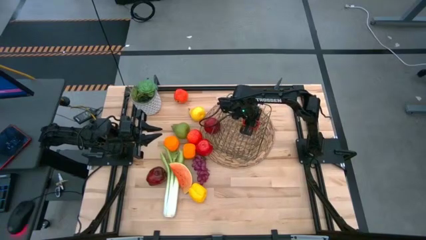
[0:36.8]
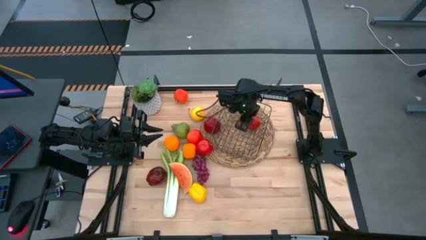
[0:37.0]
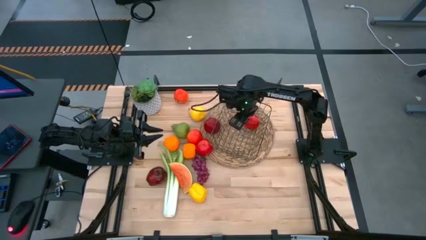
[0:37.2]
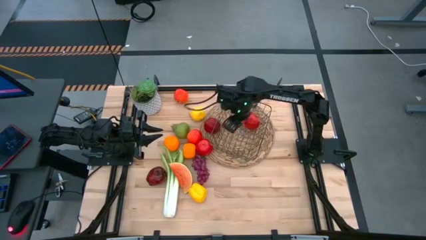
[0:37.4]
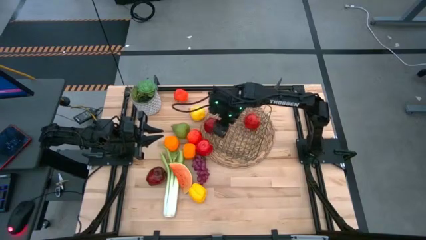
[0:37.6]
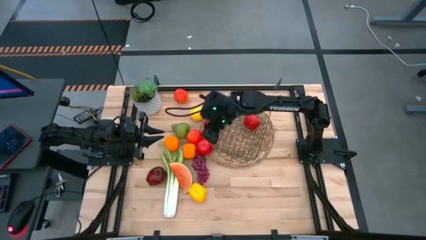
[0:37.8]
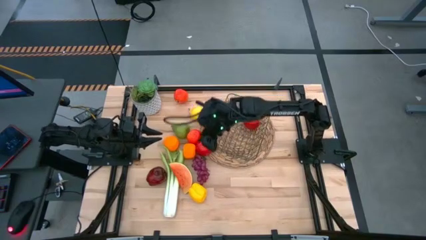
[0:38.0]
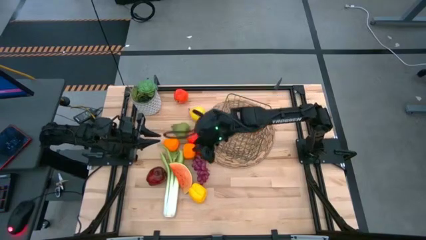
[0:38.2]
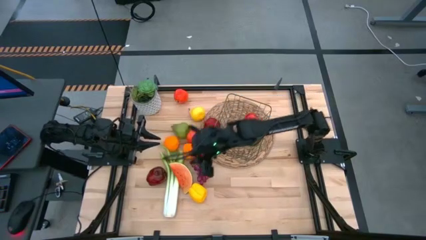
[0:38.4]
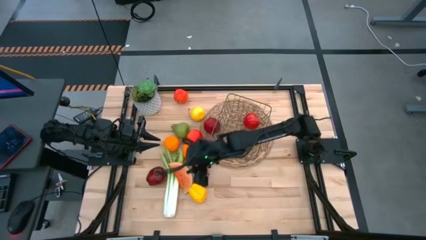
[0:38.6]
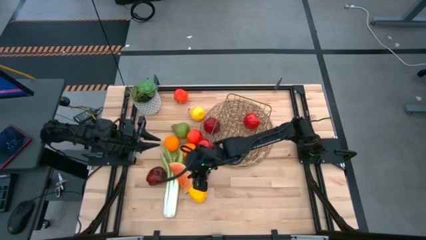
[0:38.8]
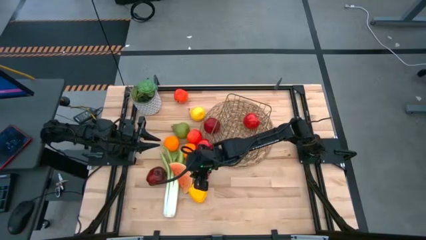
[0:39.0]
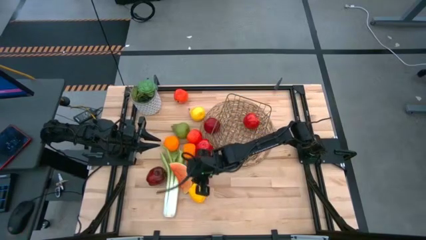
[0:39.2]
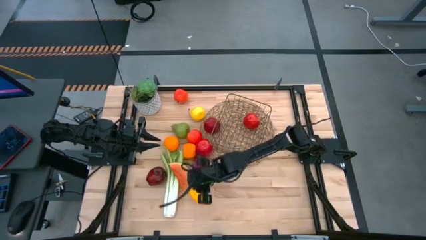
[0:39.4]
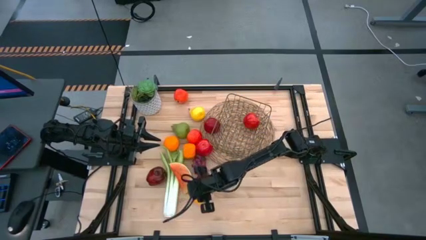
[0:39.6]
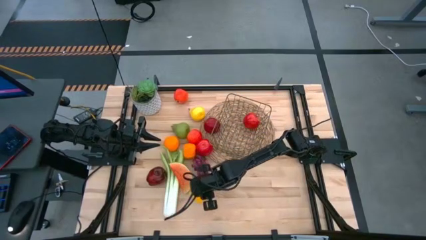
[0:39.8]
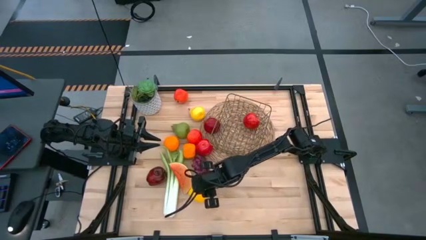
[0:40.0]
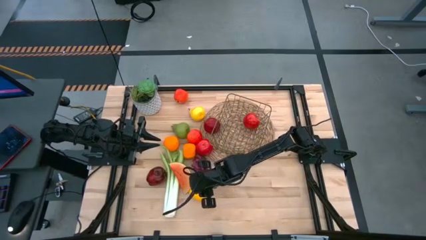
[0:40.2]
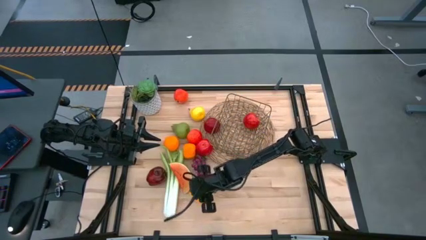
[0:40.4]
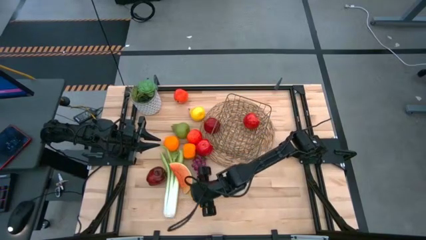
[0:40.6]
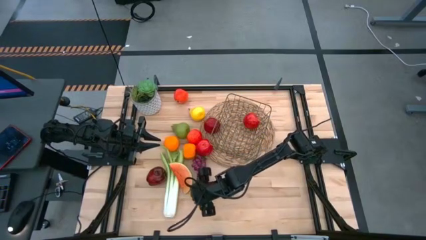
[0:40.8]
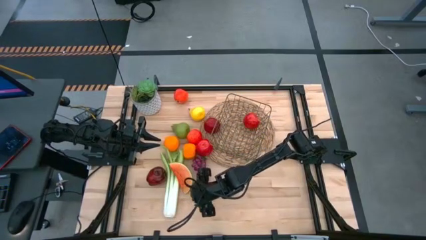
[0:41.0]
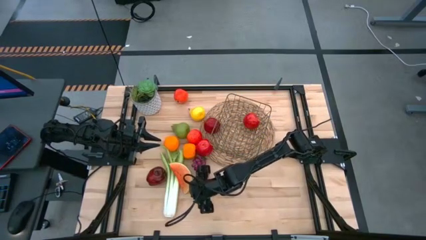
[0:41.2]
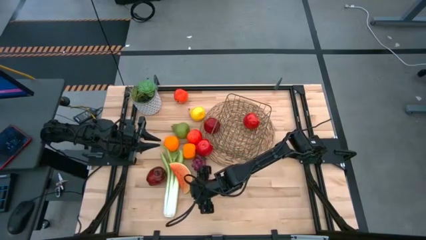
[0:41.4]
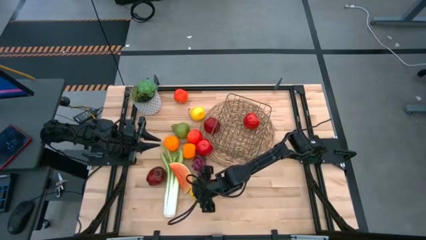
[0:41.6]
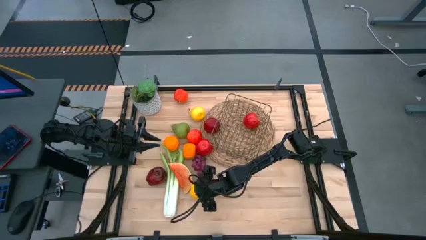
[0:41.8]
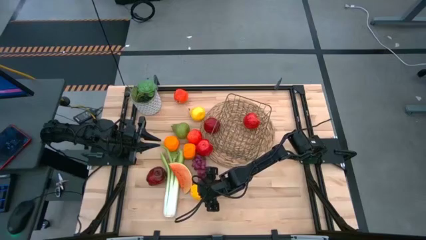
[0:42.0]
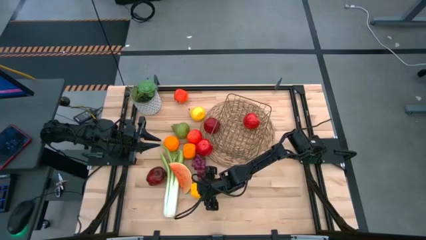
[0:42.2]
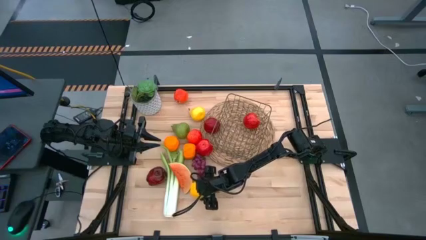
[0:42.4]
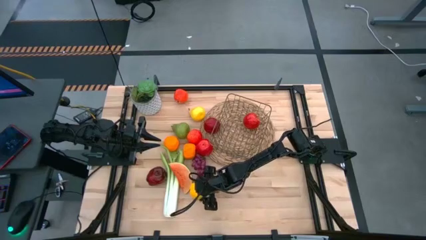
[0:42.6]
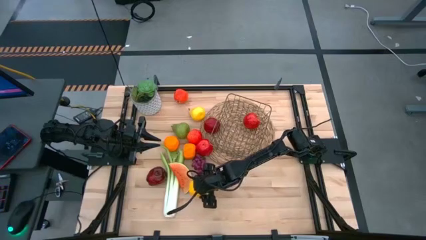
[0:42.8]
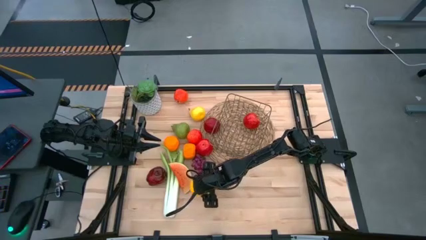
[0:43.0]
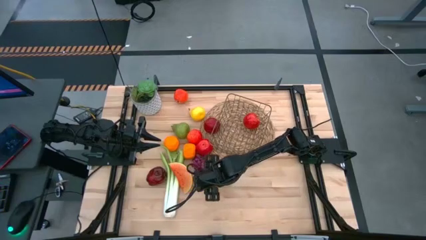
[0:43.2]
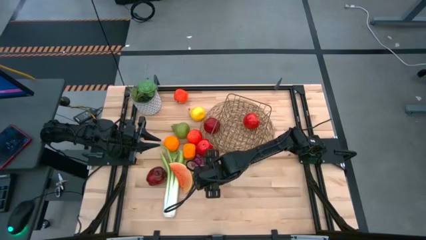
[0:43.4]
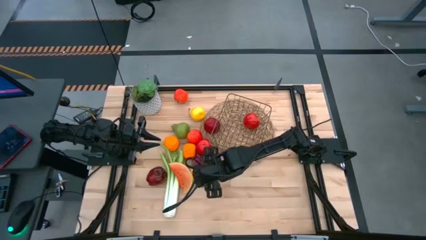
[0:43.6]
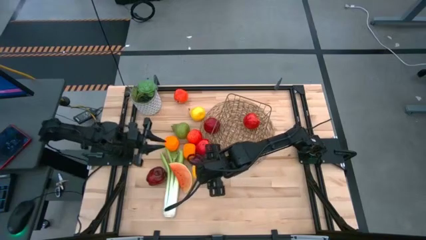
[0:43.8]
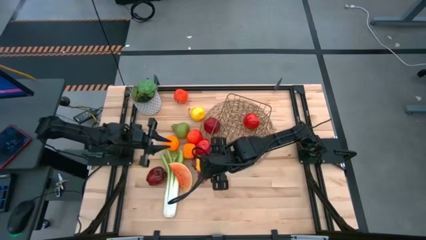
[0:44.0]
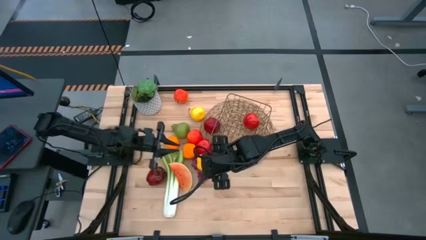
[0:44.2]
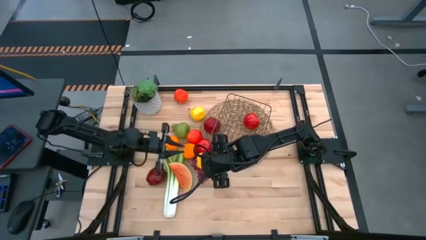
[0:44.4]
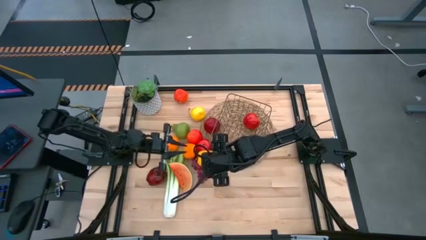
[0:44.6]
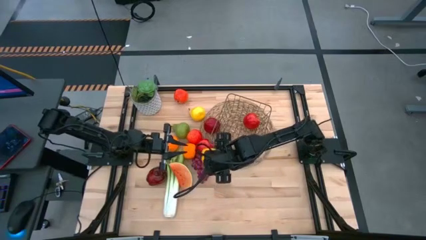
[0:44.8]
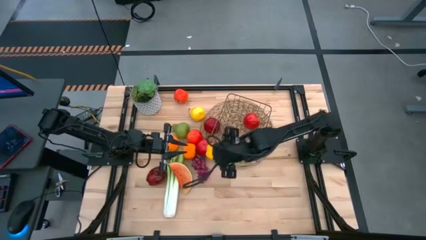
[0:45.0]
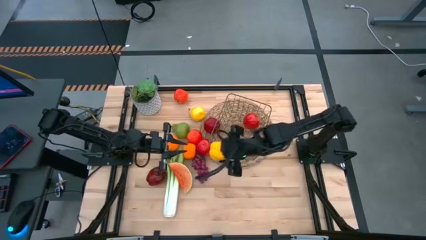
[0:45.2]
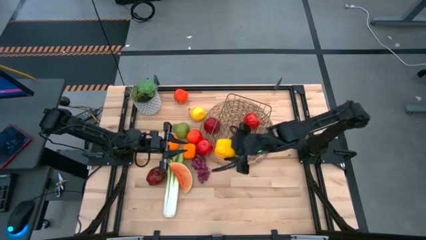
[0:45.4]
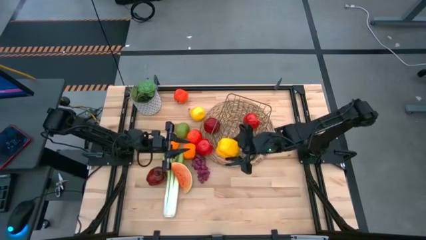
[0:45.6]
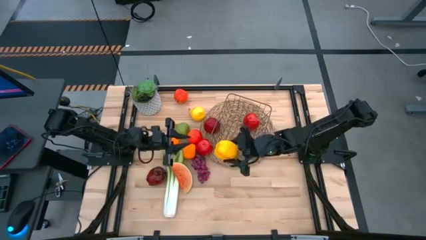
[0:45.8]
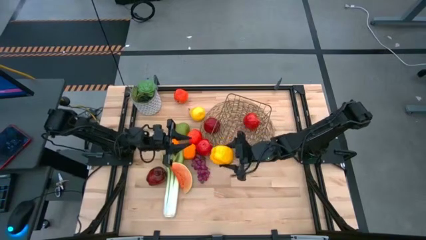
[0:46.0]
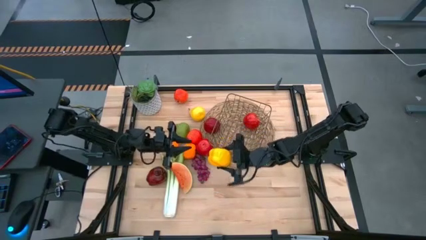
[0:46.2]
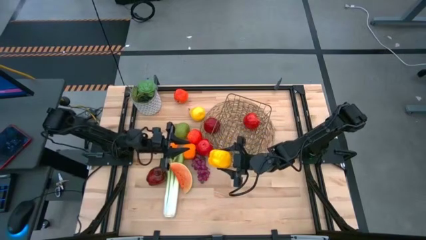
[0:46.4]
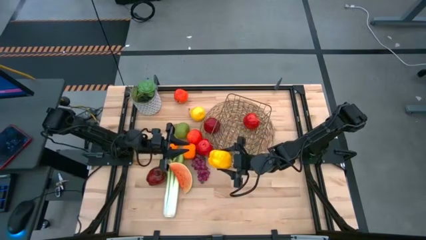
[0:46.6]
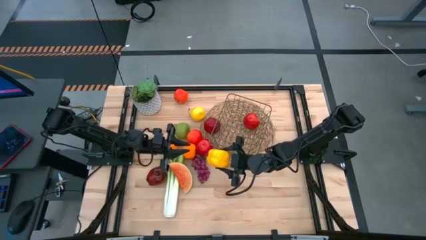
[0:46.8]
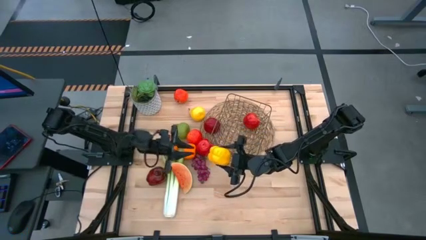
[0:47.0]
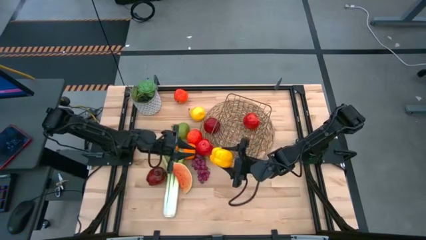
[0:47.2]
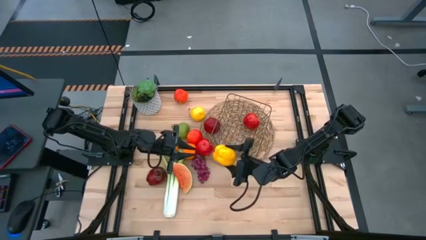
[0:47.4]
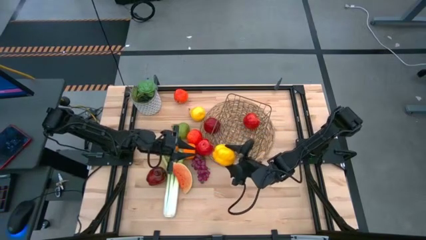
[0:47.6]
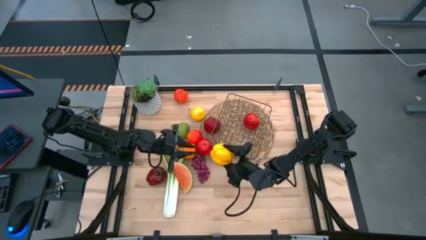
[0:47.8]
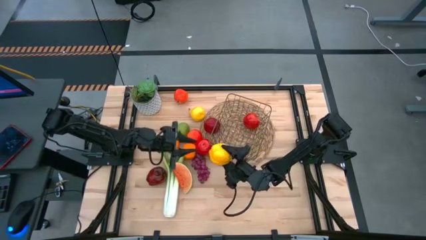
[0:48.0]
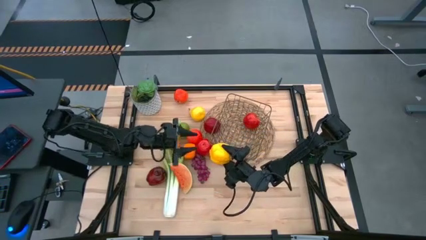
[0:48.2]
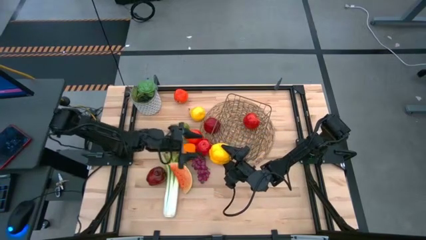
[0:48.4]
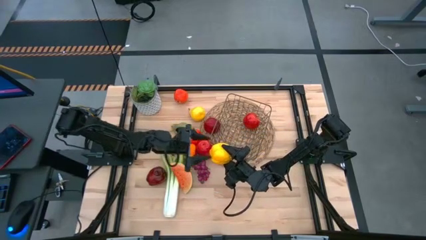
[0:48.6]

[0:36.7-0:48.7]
Task: Build produce basket
Put the yellow bell pepper into the gold wire basket

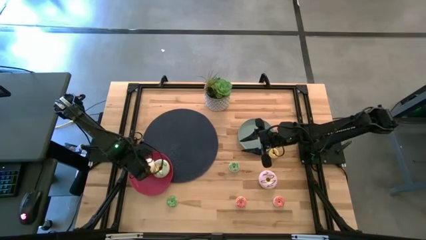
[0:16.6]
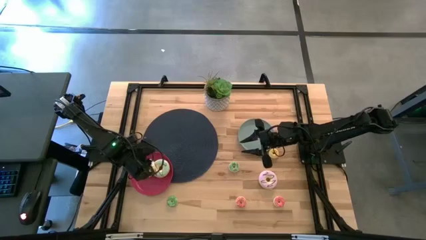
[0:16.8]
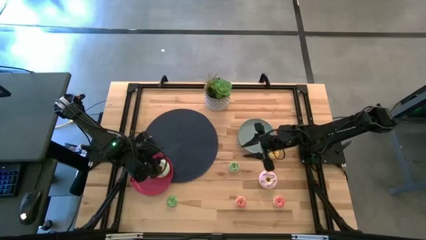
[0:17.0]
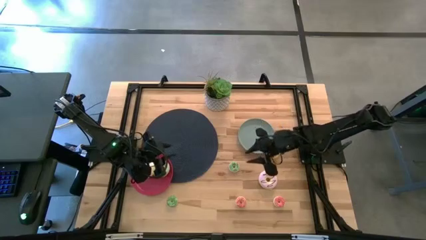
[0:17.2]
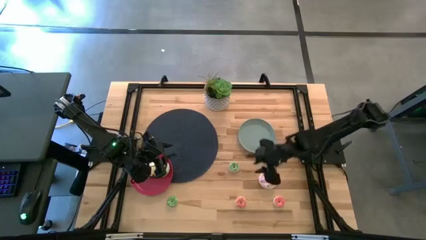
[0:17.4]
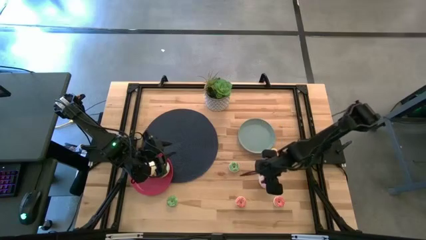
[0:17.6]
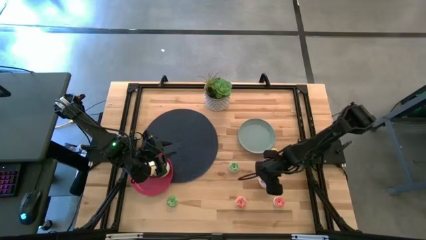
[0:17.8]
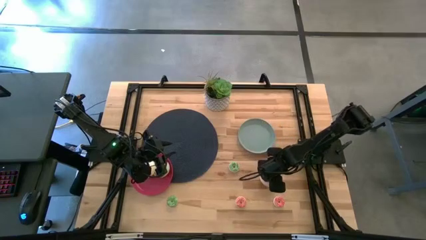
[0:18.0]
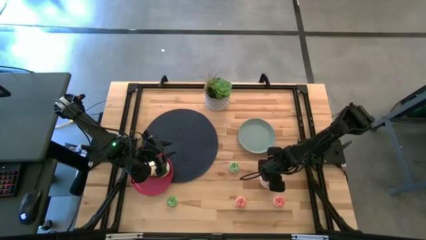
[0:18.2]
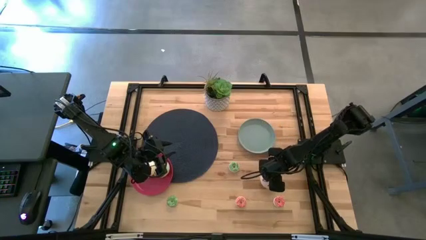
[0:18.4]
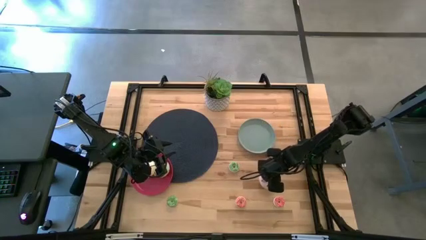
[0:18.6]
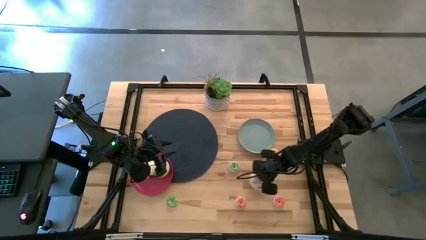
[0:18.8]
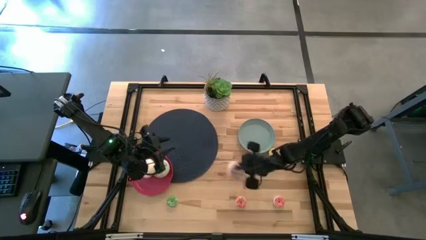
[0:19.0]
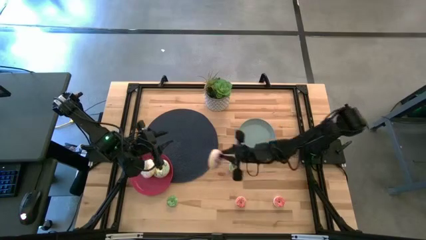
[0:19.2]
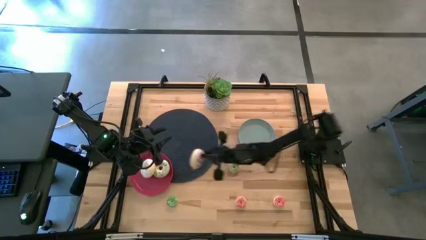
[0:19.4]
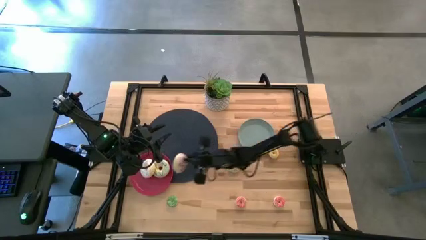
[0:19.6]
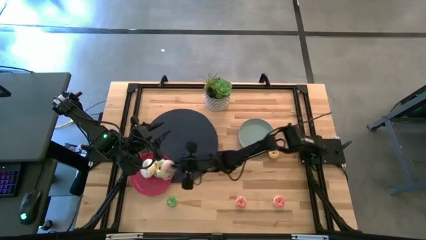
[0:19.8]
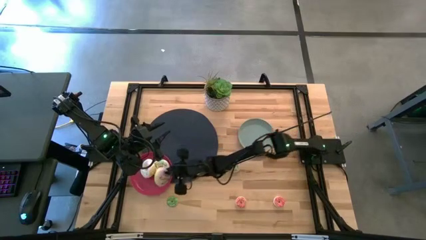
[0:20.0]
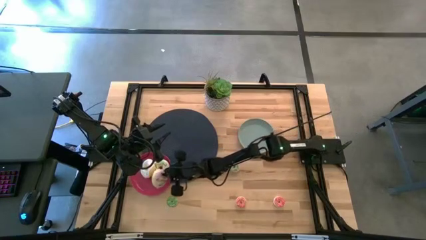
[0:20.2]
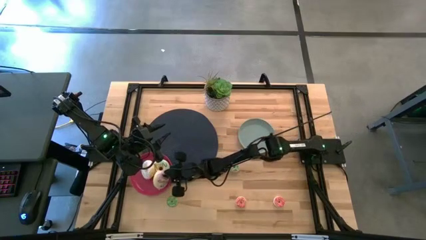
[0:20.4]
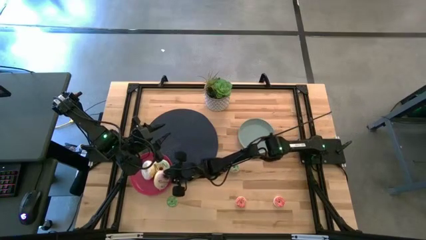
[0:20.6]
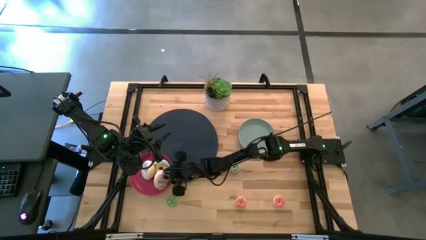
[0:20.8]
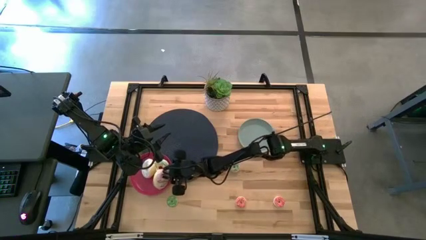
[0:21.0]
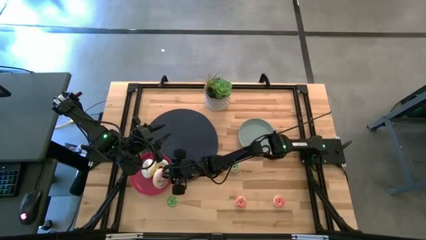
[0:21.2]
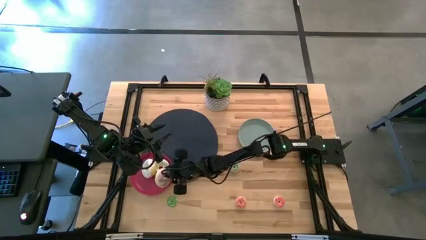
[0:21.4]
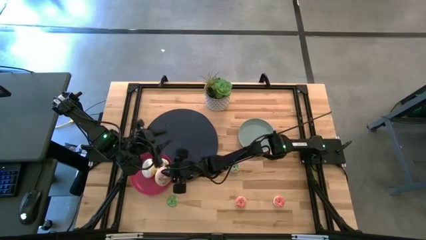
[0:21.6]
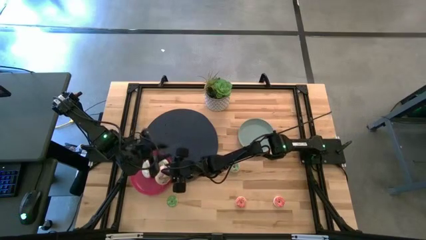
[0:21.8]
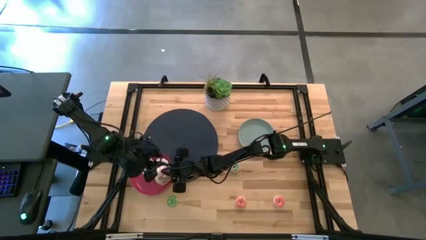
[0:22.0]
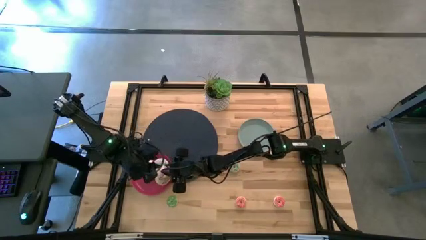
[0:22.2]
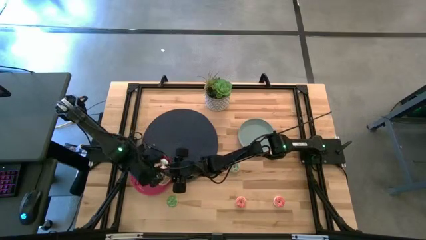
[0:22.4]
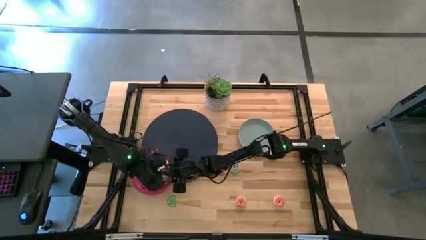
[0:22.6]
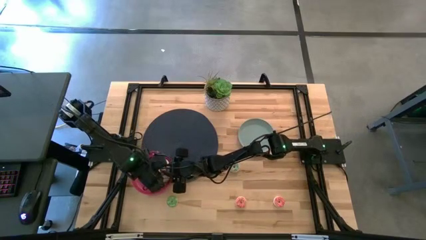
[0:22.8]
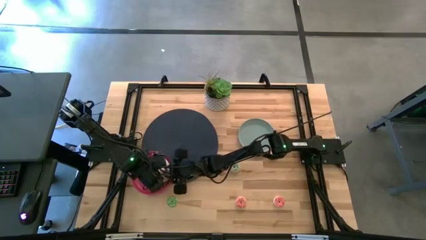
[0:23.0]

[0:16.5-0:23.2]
Task: Pick & Place donuts
Put the large purple donut on the red plate
